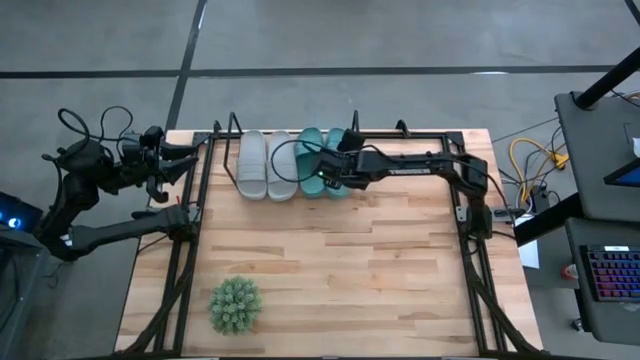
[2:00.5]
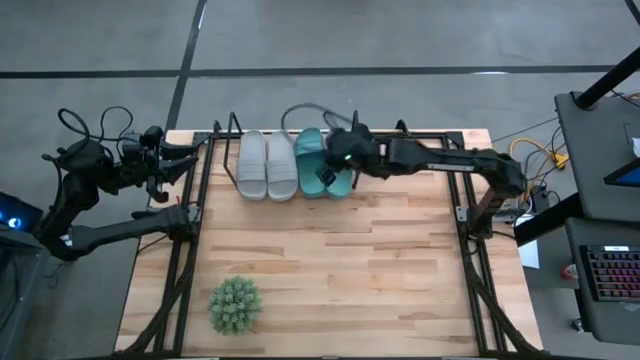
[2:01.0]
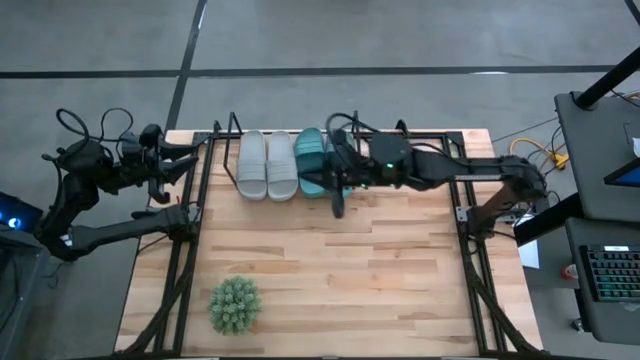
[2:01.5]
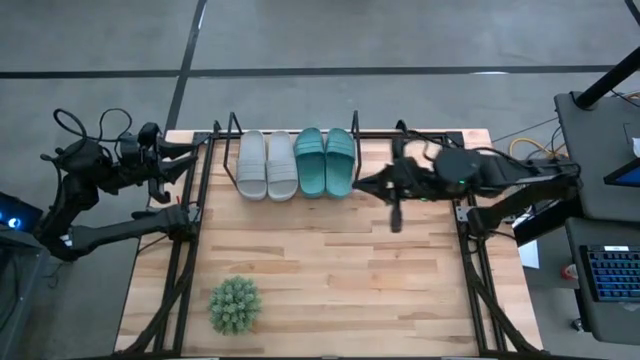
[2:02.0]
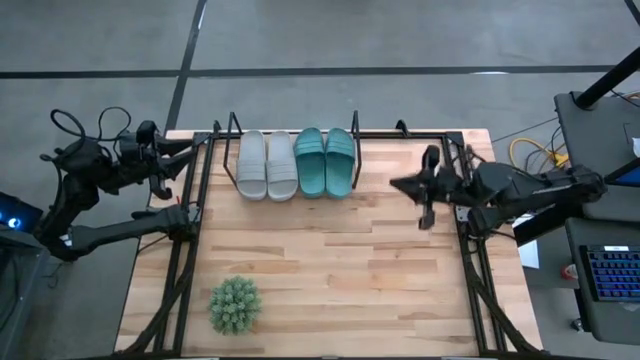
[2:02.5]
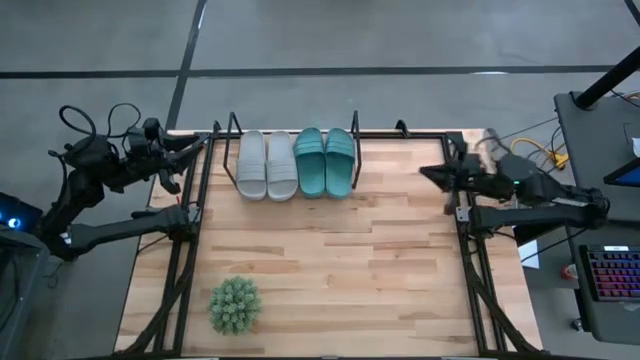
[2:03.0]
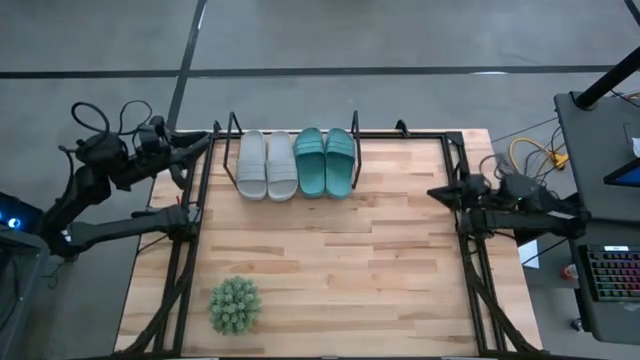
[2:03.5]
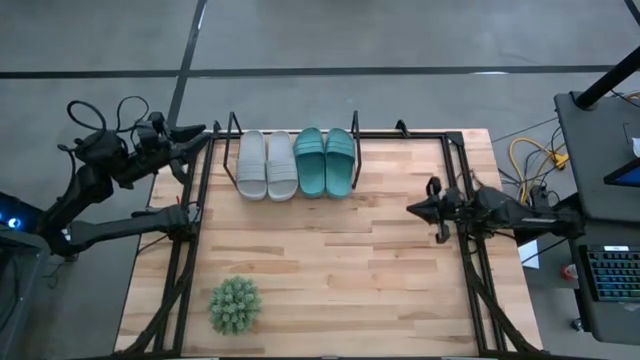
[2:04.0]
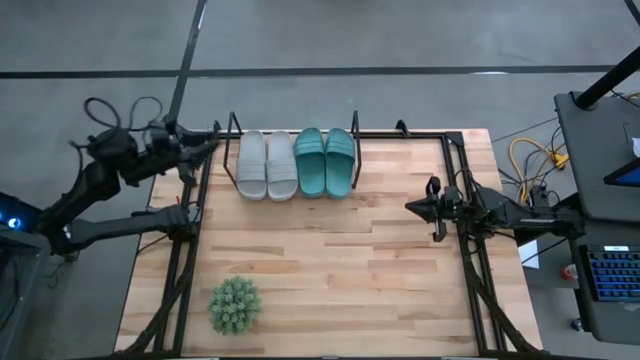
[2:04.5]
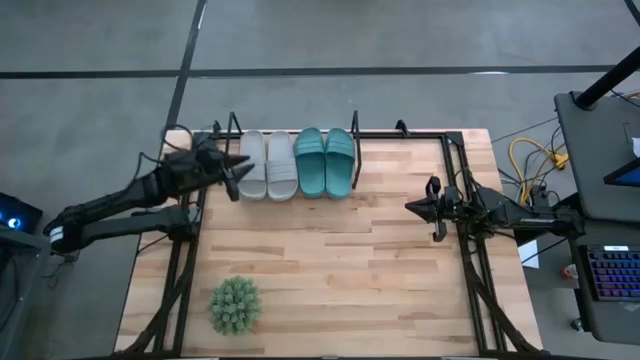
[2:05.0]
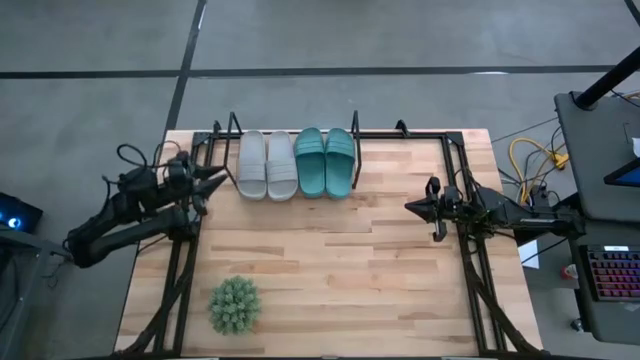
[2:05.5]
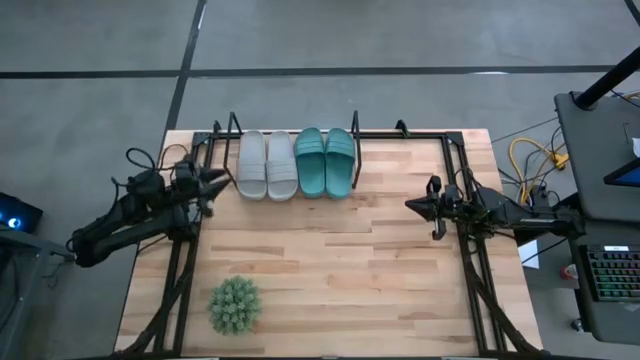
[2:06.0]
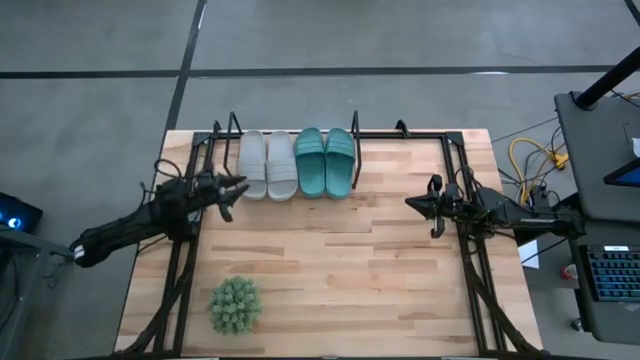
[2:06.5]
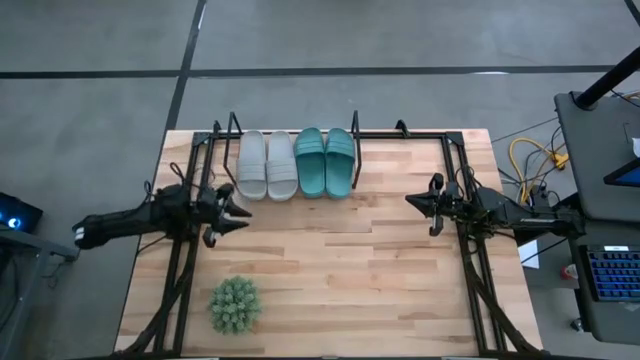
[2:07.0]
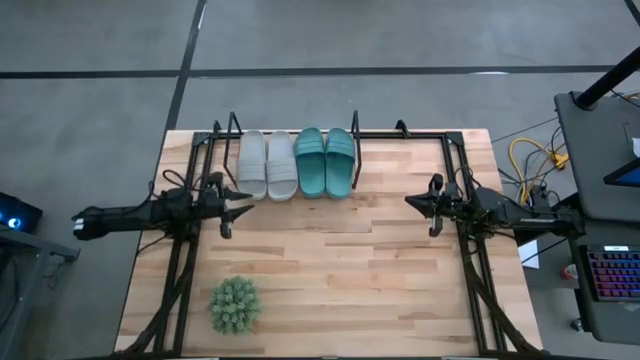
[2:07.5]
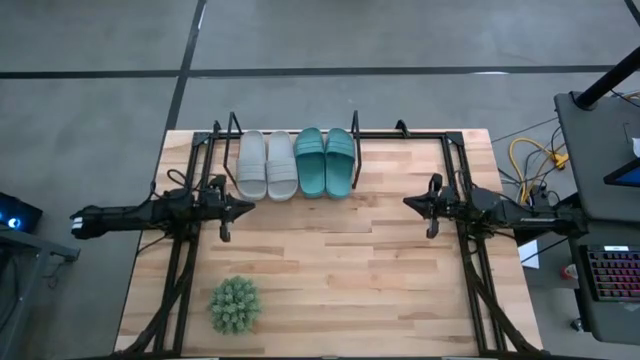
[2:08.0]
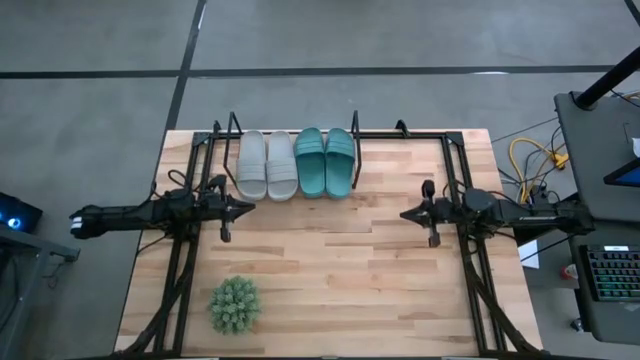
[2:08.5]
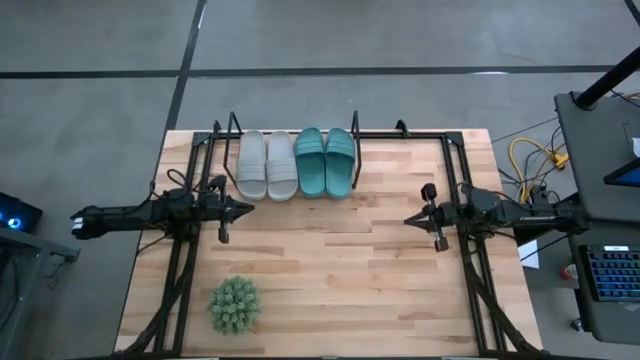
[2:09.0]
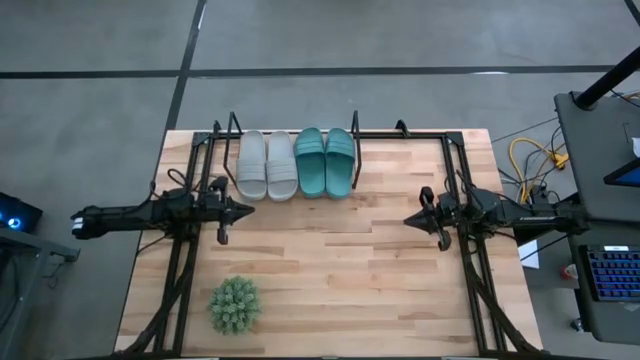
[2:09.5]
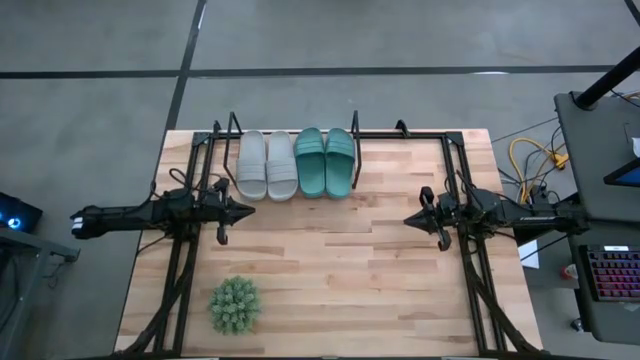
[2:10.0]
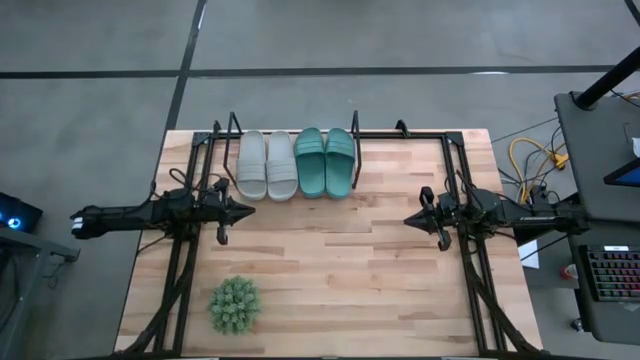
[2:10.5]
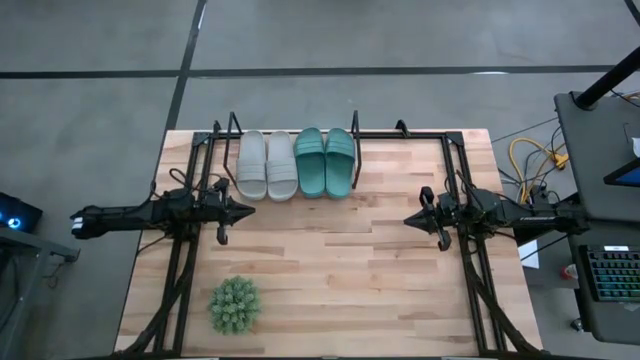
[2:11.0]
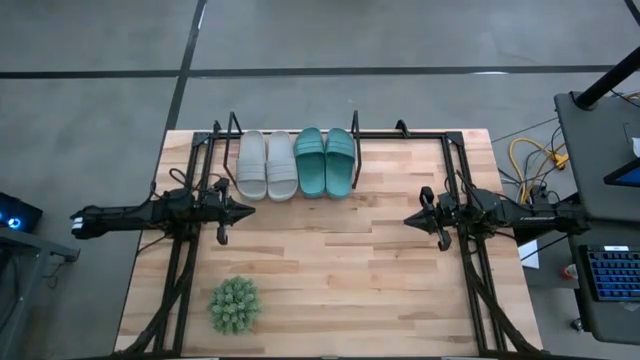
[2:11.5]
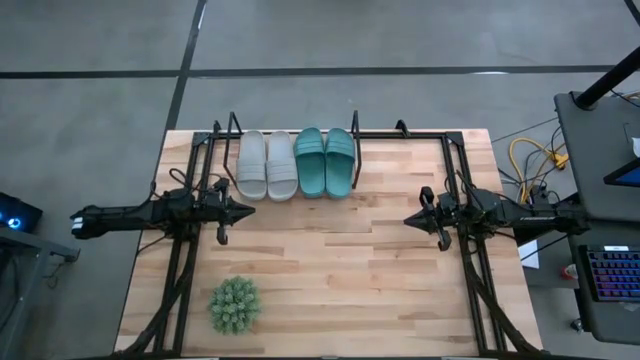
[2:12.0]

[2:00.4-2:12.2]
Task: Pick and place slides into the shelf
Return to Home Position

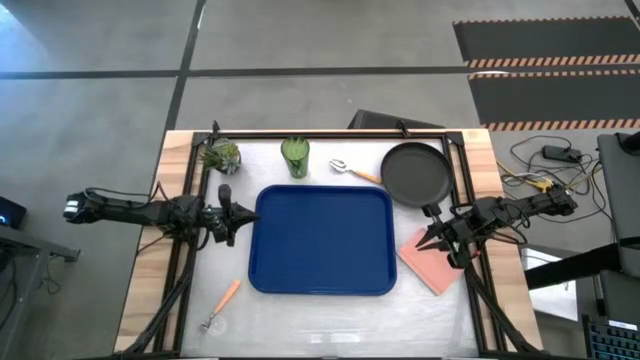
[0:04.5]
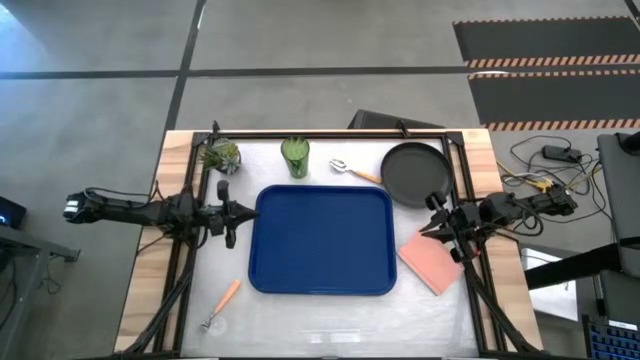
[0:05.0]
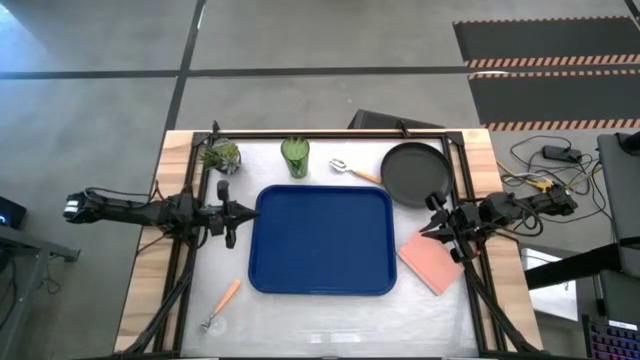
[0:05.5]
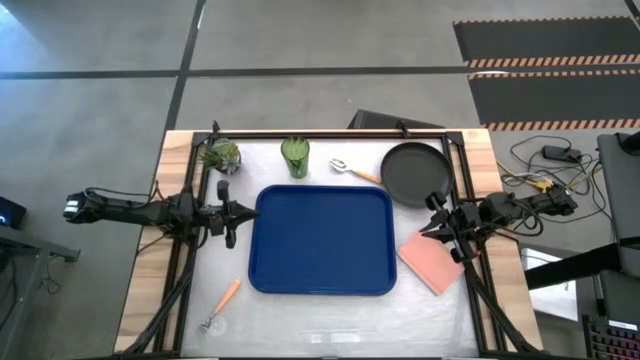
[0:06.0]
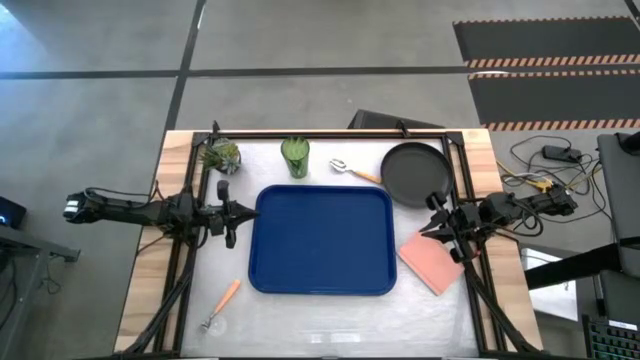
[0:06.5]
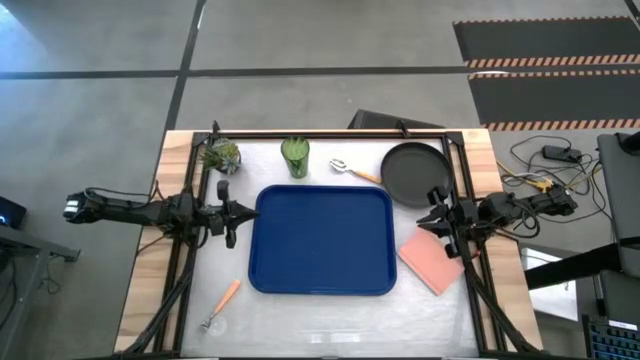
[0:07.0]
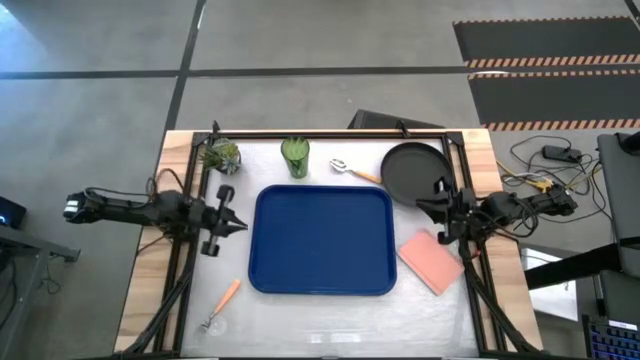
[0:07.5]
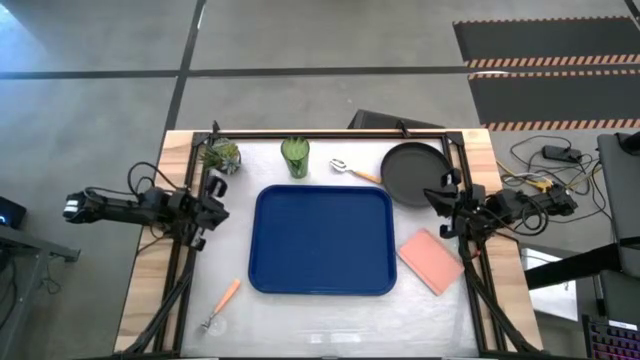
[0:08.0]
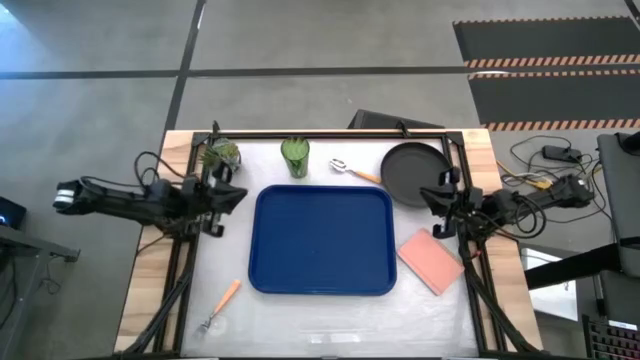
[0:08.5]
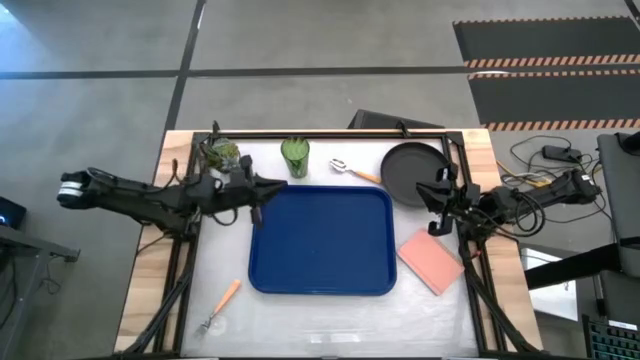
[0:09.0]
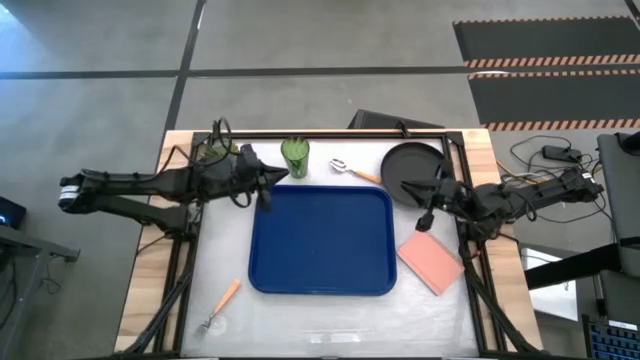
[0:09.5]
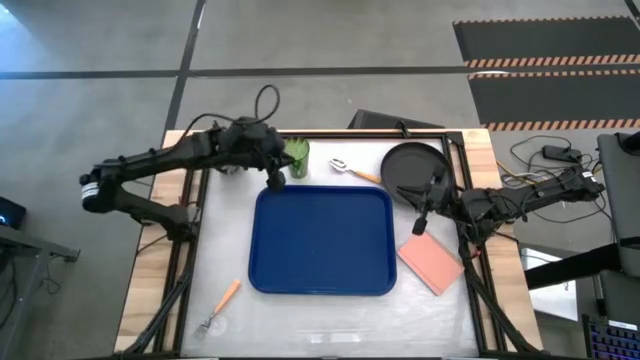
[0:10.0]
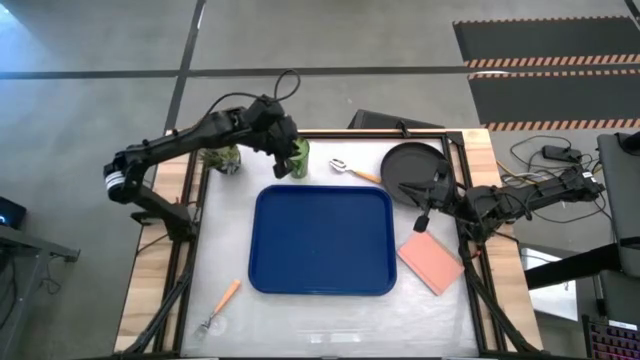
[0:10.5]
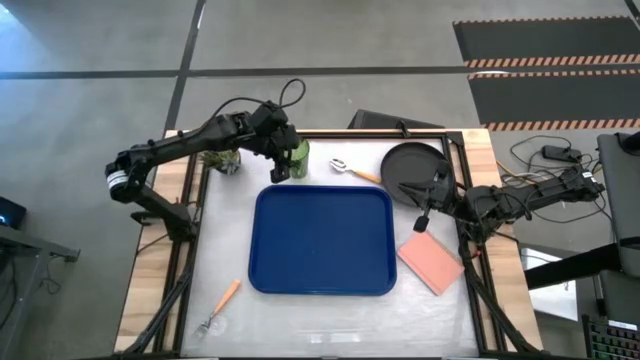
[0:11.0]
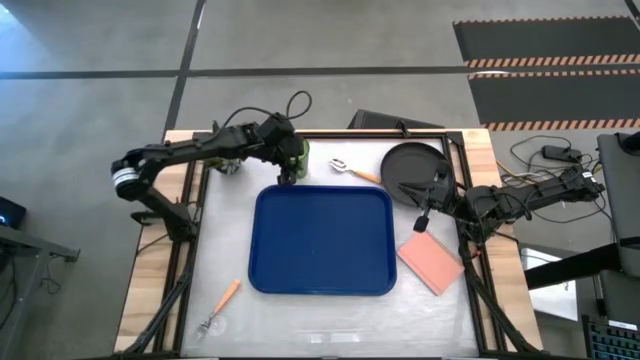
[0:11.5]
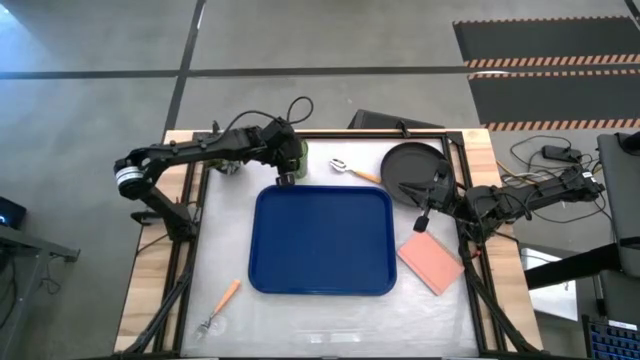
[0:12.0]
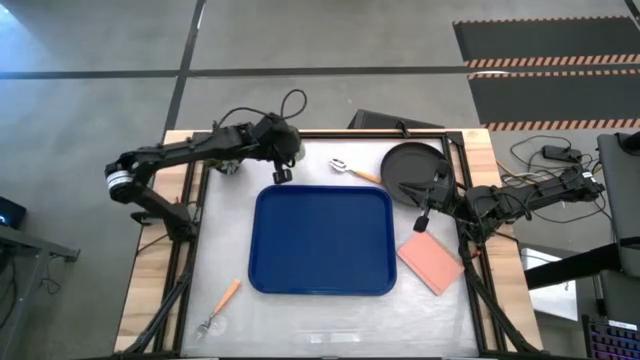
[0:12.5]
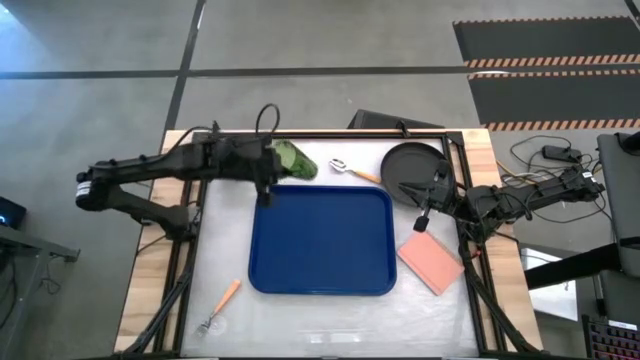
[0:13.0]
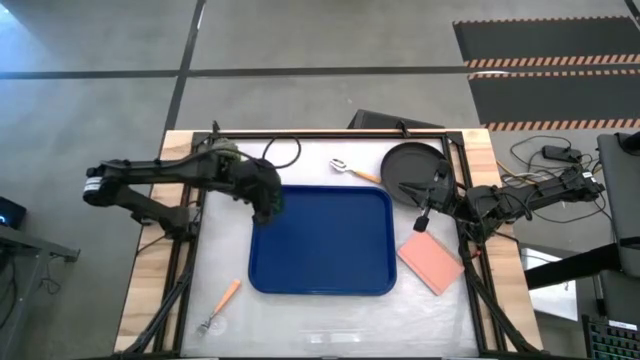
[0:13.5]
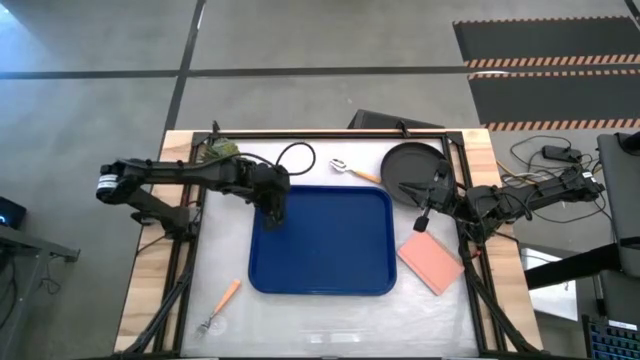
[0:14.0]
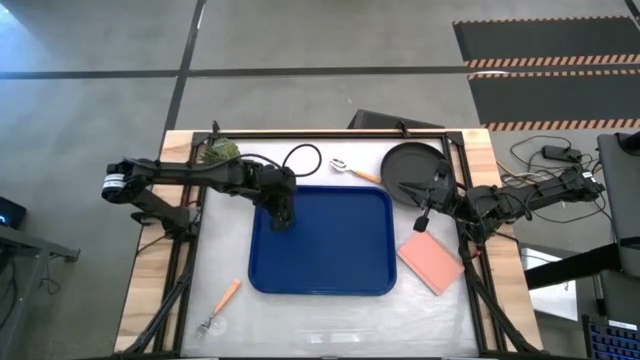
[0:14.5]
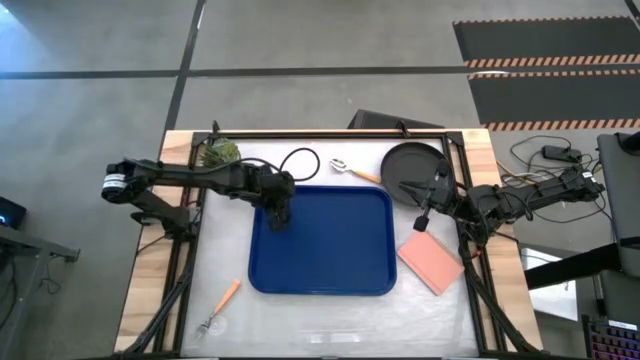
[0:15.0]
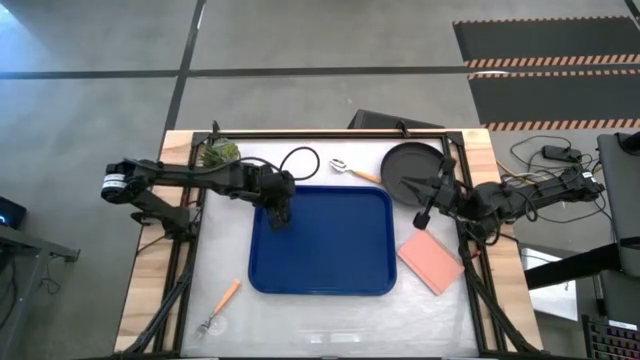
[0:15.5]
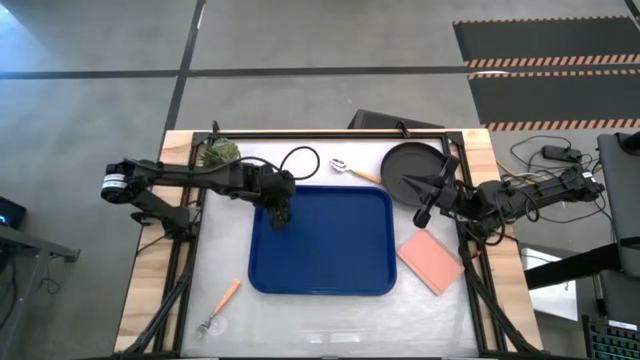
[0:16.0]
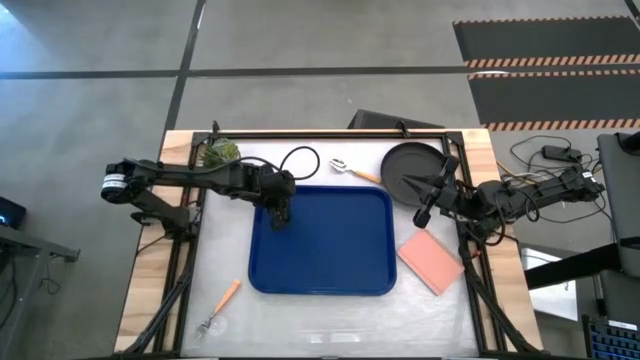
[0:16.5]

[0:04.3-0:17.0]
Task: Pick and place plate/cup/fork/spoon on tray
Put the cup on the blue tray
